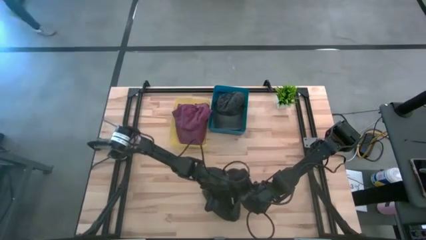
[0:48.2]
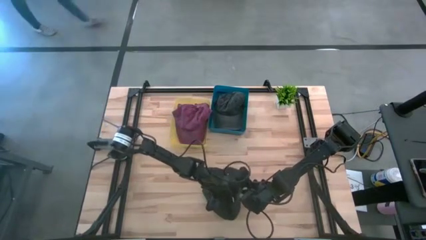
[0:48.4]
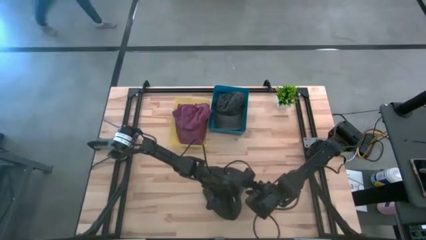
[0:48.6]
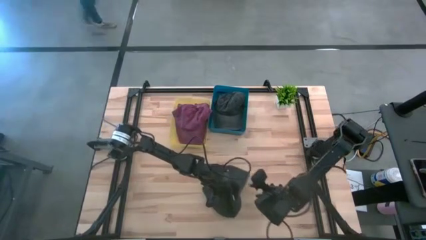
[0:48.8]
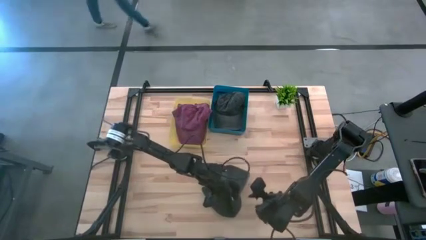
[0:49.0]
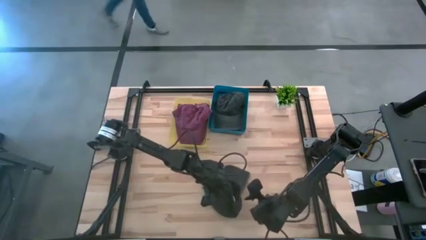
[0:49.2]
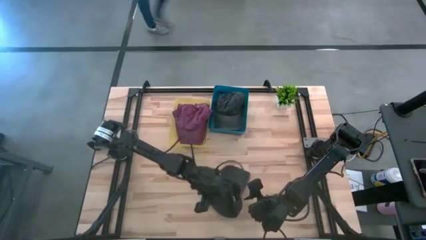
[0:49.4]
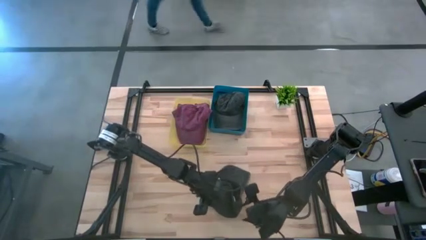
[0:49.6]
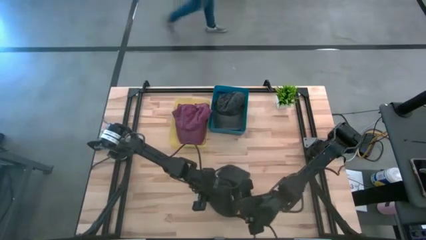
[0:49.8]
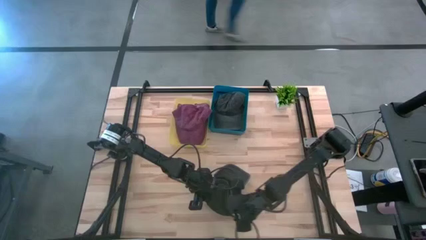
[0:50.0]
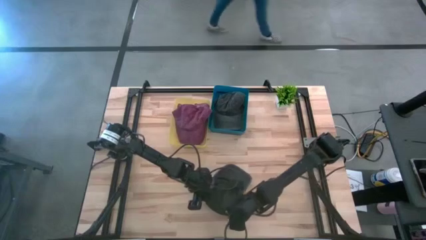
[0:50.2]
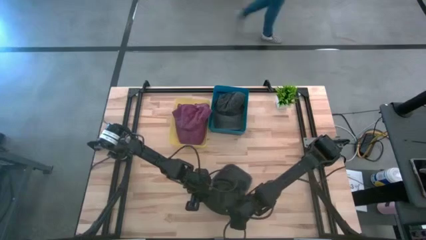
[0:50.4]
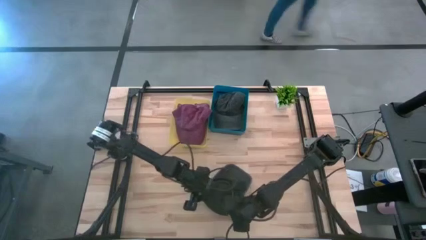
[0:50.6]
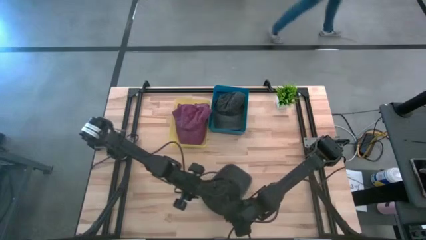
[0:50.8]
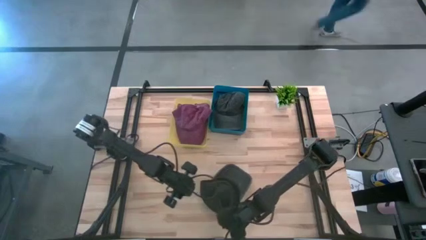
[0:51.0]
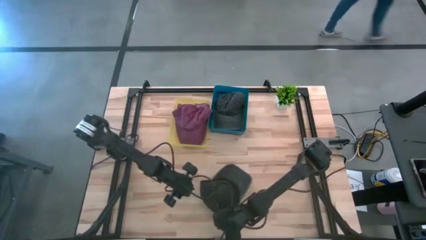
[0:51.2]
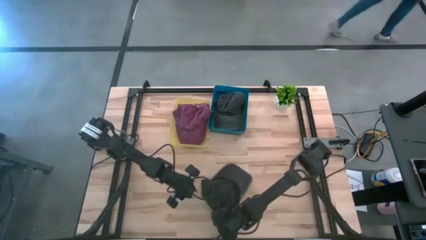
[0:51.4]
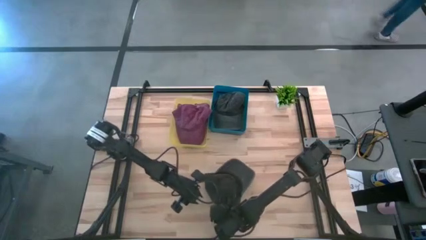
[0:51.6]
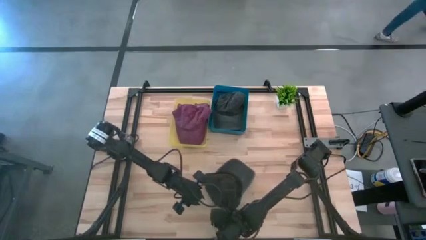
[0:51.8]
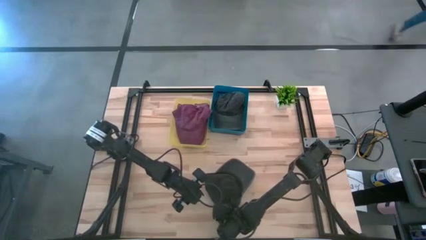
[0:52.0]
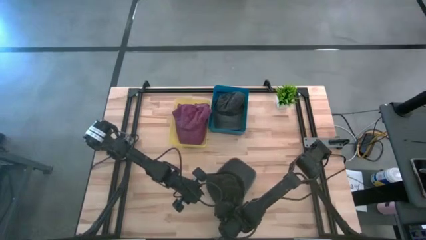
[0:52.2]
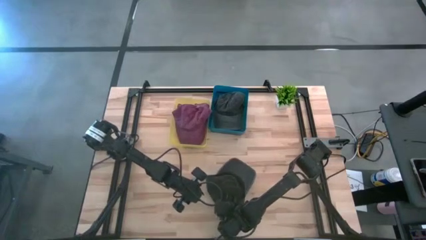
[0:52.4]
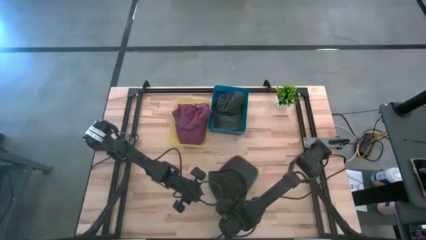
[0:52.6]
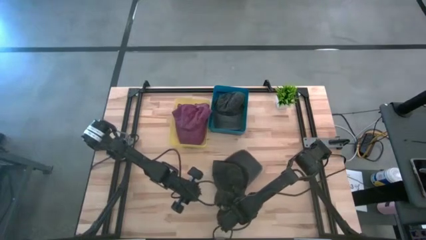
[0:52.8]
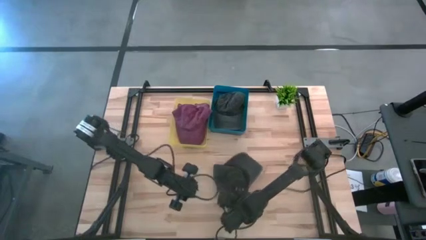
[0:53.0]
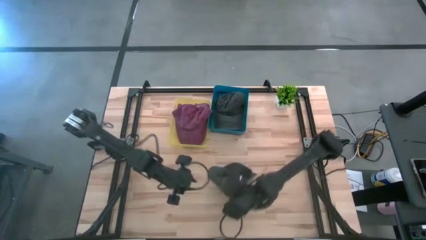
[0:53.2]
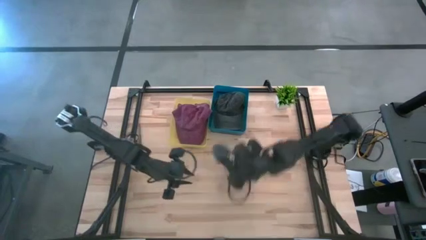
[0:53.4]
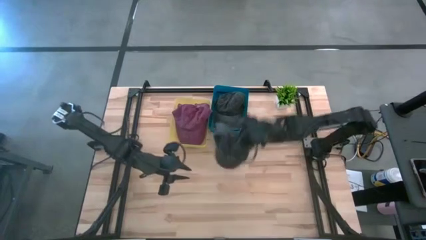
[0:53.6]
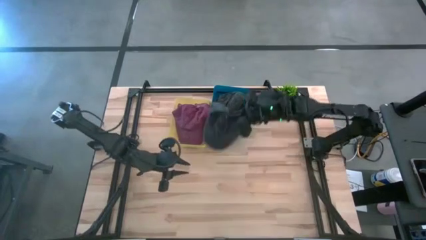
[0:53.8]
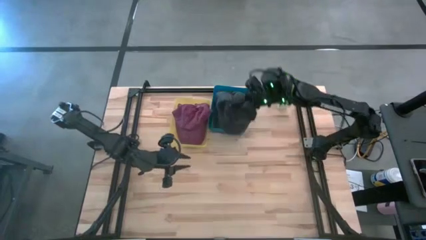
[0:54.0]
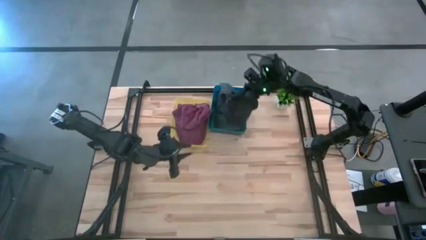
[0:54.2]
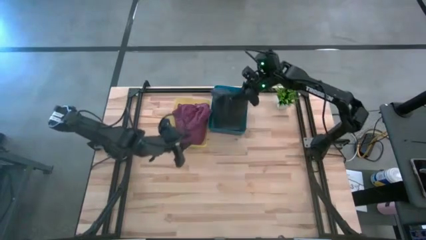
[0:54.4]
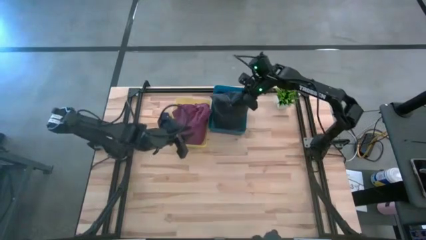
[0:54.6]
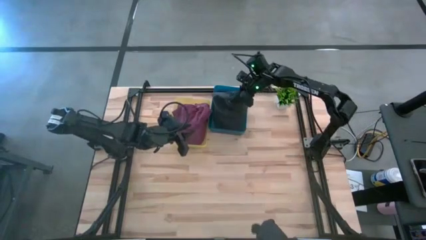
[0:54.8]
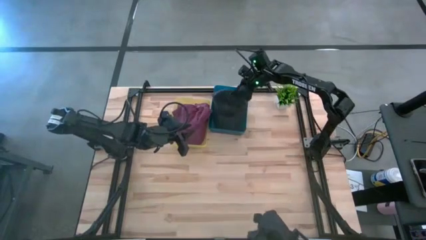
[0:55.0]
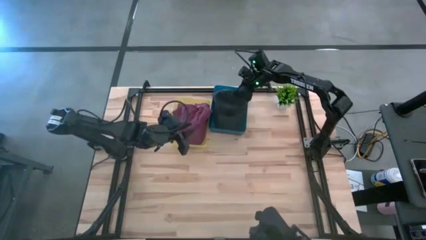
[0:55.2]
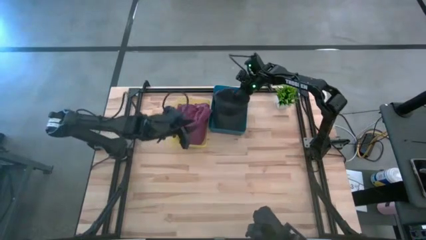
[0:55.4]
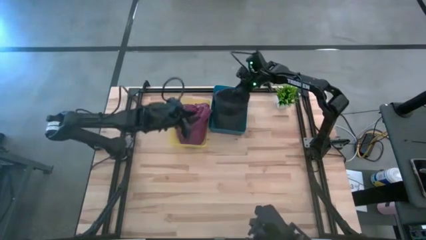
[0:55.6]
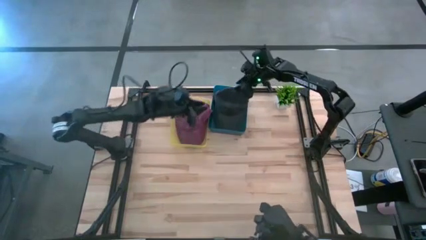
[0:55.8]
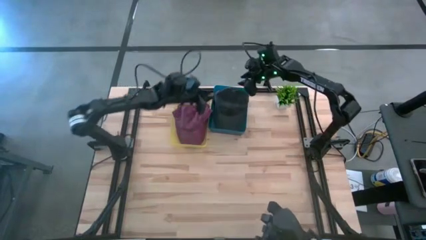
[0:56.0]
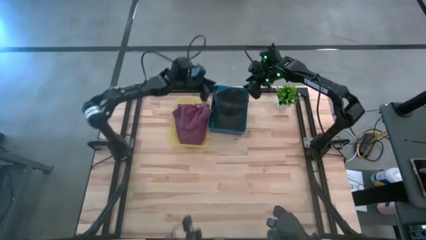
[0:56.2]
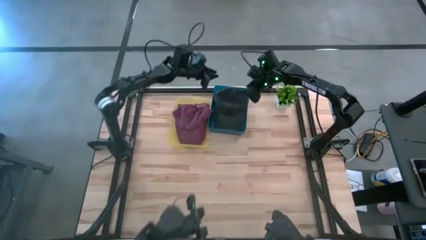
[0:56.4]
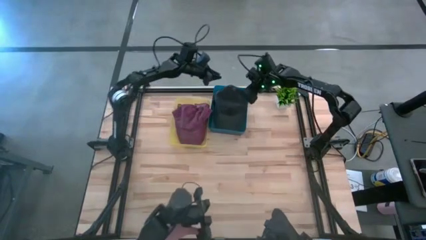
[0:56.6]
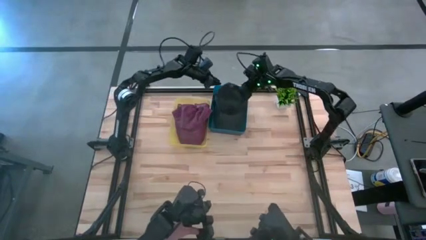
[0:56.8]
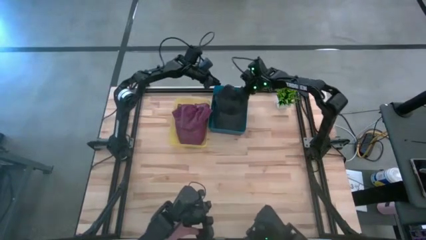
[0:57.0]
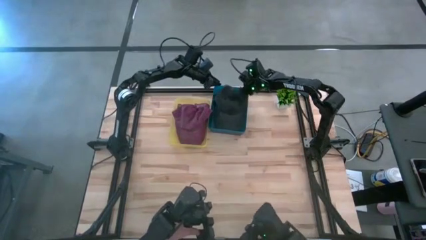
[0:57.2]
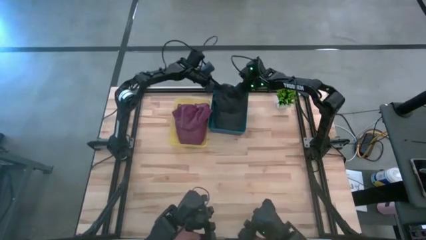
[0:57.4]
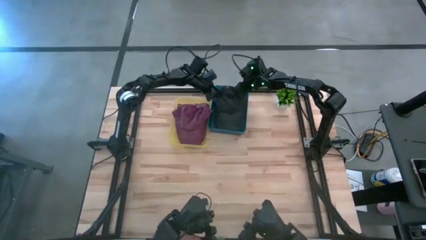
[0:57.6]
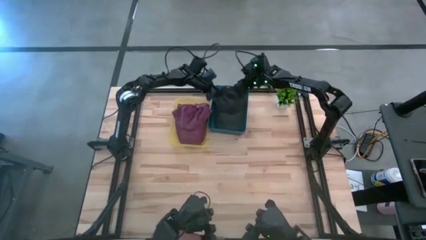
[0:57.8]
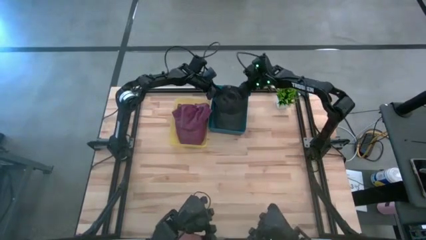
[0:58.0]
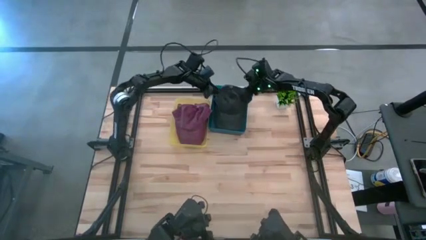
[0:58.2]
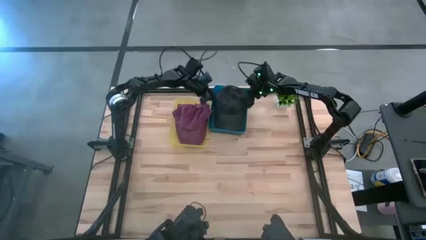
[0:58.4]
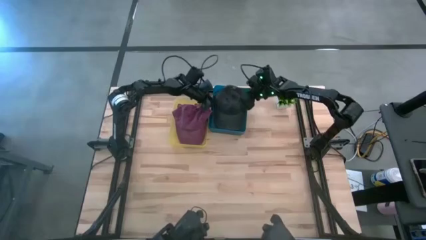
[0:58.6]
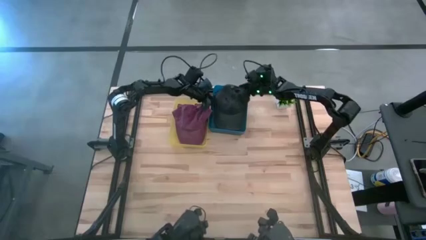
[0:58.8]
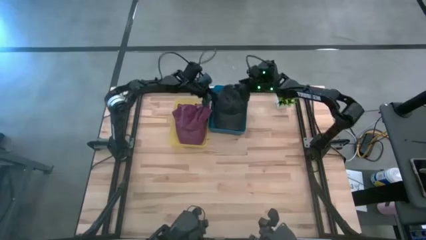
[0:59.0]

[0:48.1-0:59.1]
Task: Pick & Place hat
Put the gray cap into the blue bin

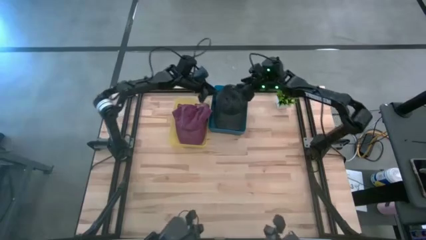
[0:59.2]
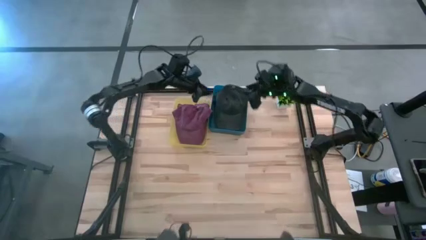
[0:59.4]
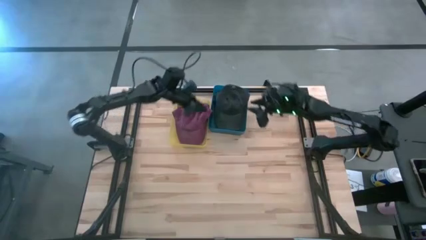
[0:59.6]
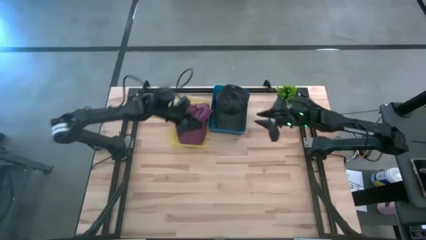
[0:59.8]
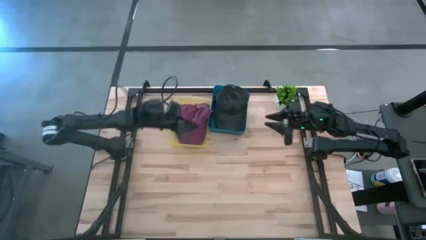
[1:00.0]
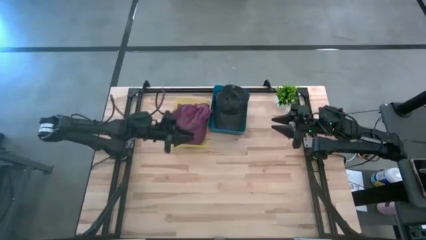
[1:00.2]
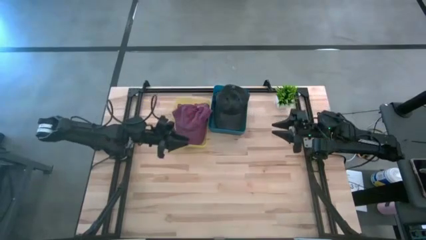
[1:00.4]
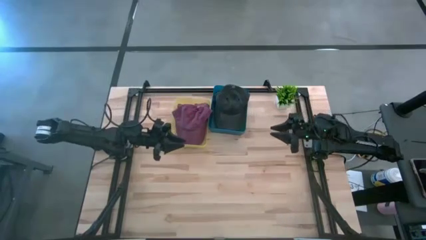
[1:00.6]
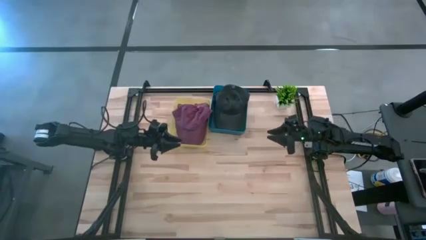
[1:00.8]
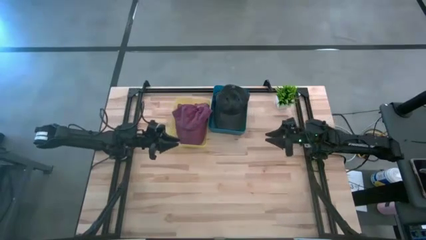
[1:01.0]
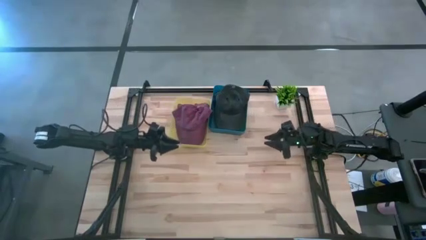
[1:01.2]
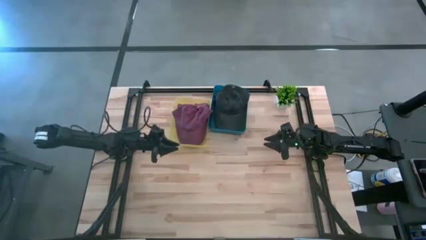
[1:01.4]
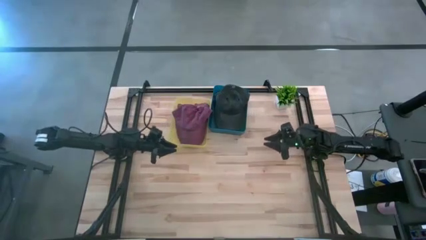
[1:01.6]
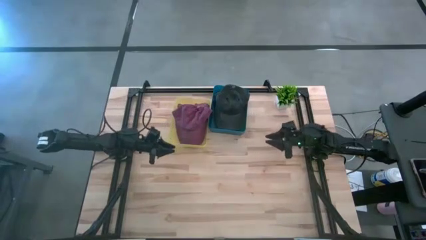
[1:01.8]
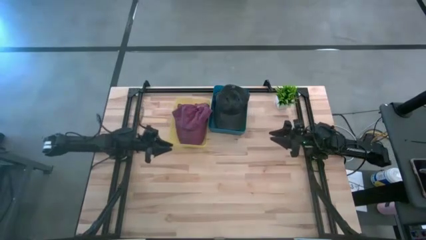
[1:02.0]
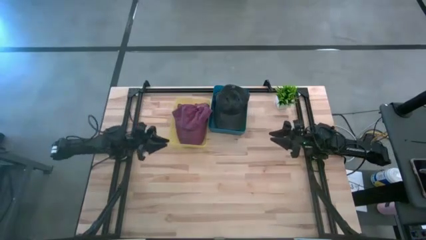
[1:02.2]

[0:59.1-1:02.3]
Return to Home Position
